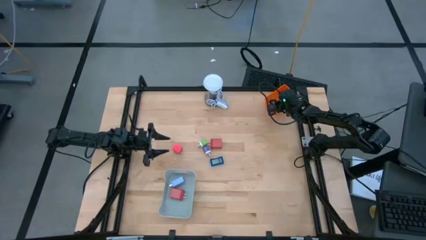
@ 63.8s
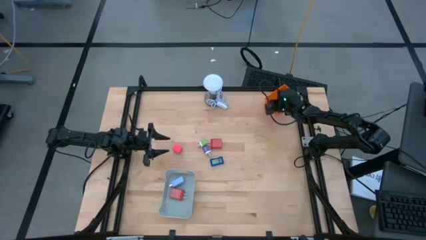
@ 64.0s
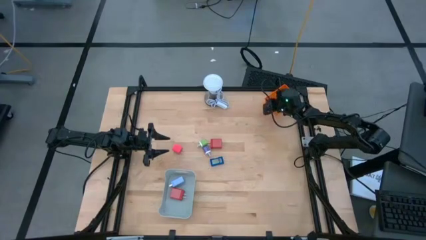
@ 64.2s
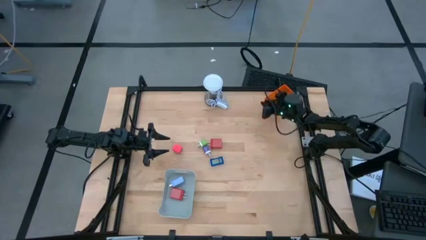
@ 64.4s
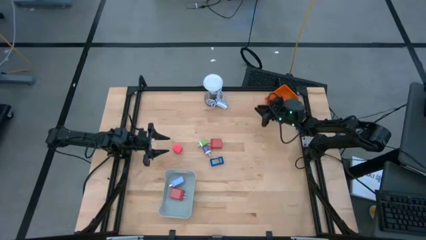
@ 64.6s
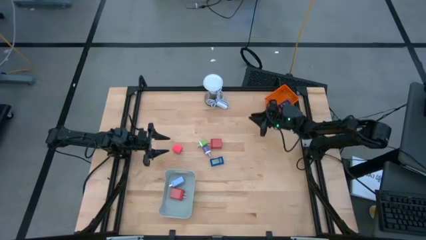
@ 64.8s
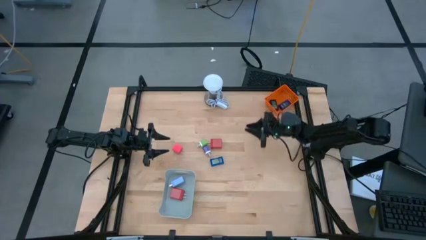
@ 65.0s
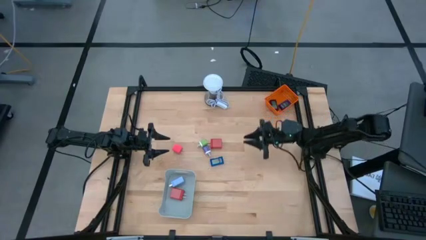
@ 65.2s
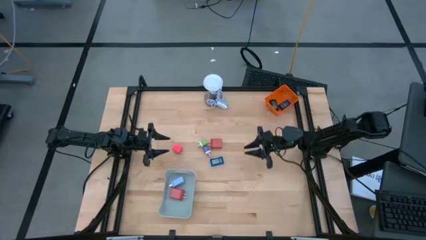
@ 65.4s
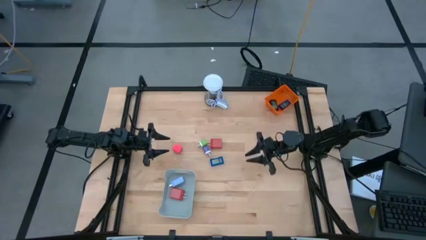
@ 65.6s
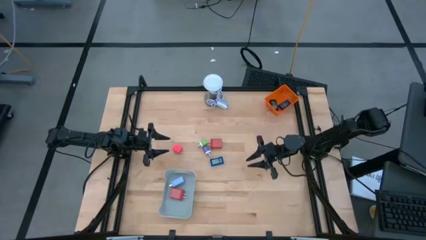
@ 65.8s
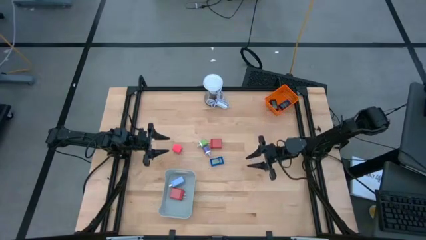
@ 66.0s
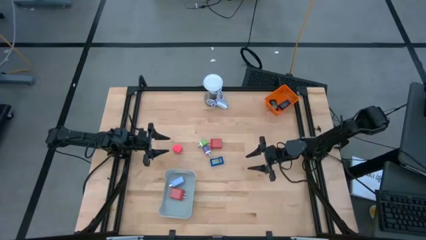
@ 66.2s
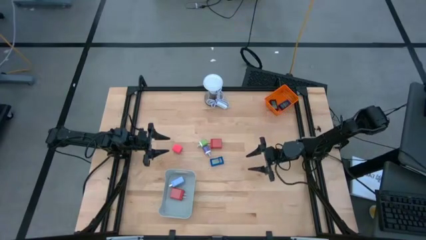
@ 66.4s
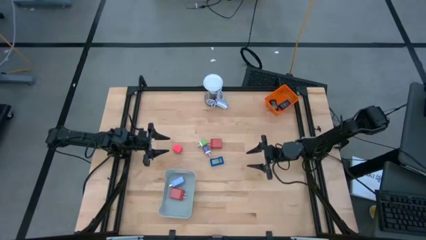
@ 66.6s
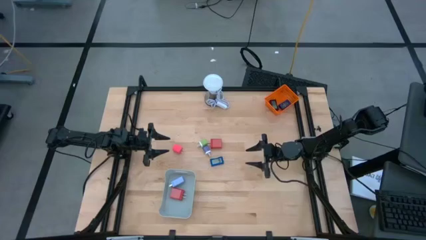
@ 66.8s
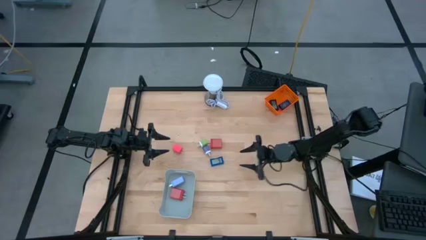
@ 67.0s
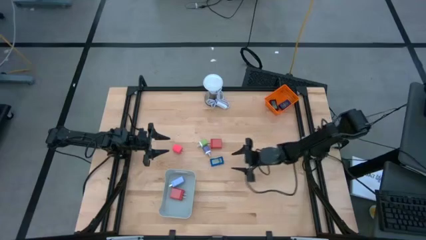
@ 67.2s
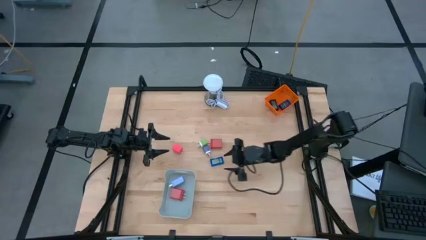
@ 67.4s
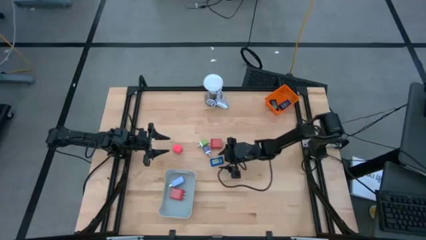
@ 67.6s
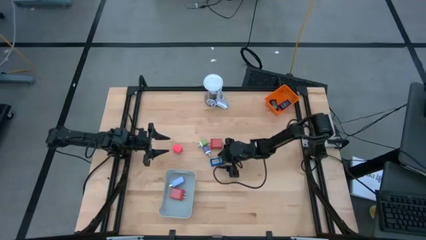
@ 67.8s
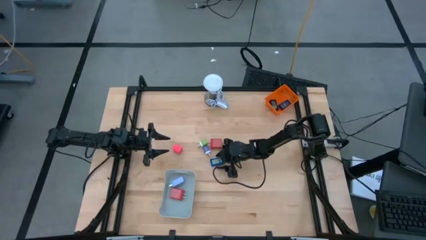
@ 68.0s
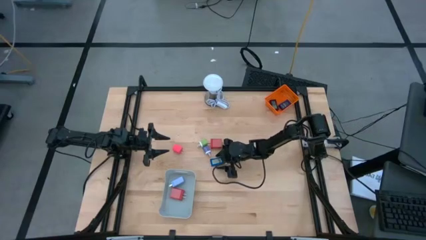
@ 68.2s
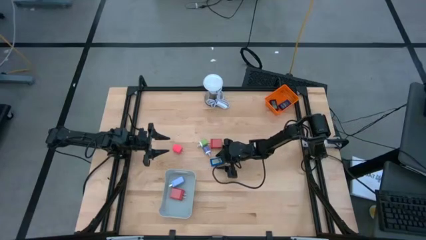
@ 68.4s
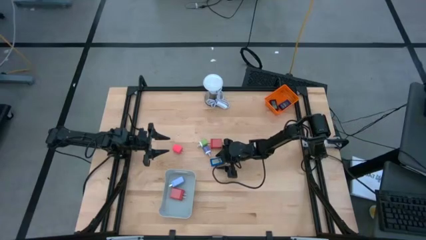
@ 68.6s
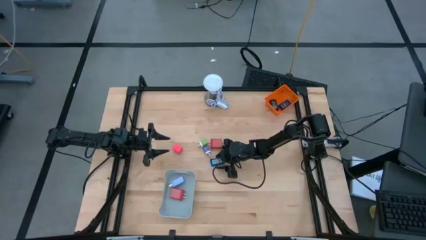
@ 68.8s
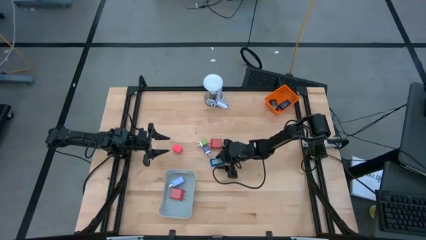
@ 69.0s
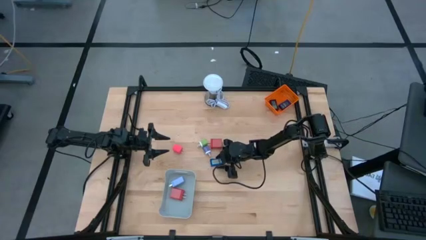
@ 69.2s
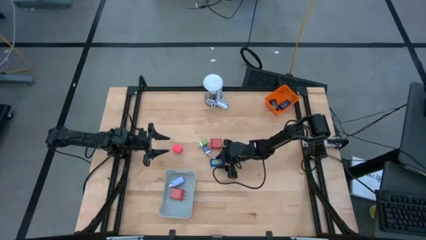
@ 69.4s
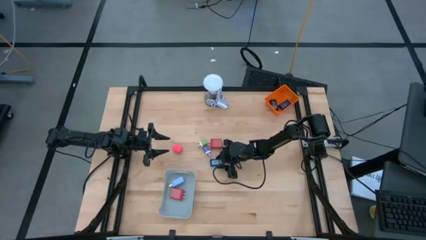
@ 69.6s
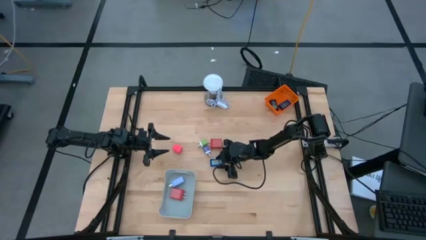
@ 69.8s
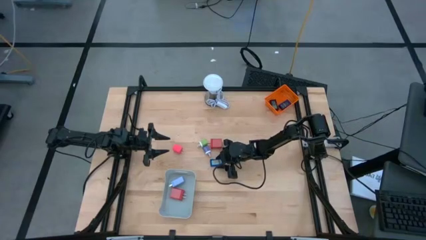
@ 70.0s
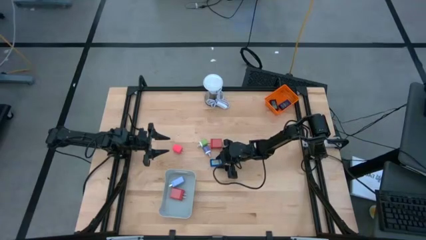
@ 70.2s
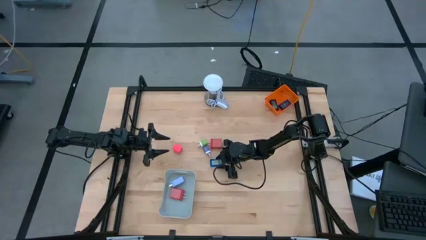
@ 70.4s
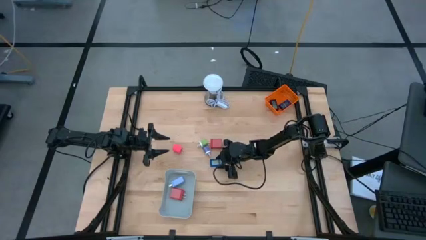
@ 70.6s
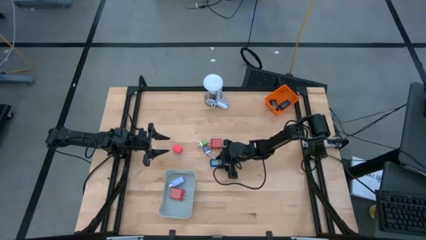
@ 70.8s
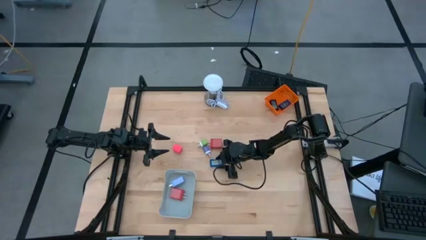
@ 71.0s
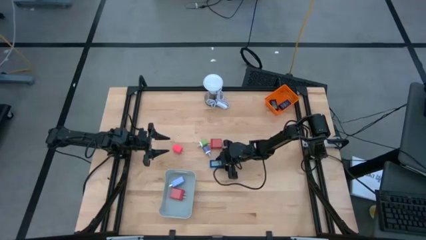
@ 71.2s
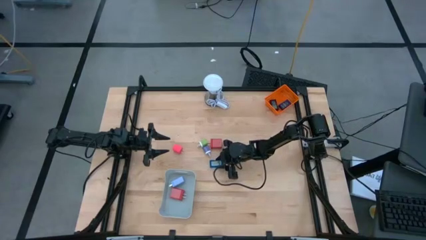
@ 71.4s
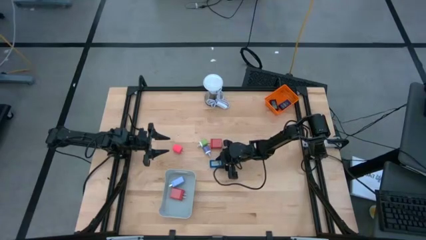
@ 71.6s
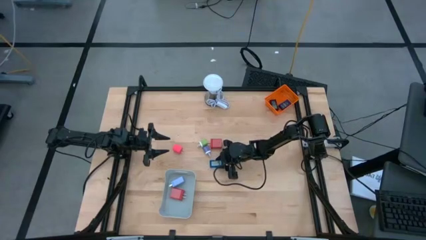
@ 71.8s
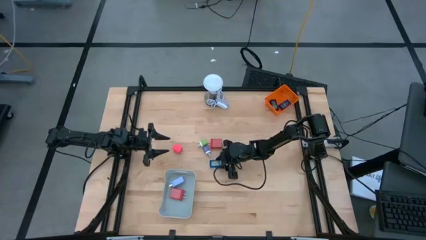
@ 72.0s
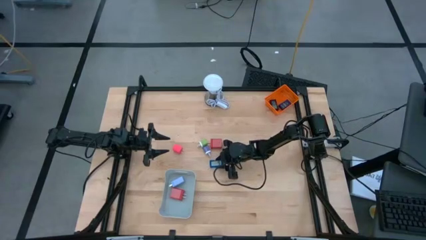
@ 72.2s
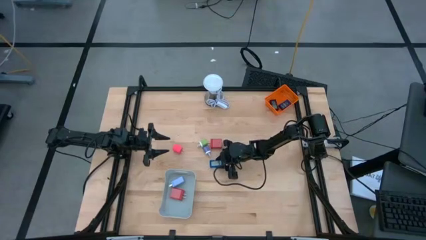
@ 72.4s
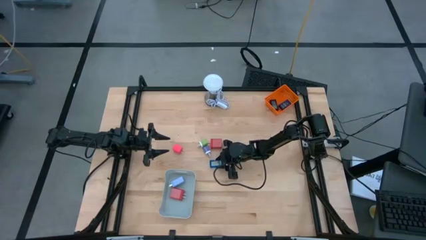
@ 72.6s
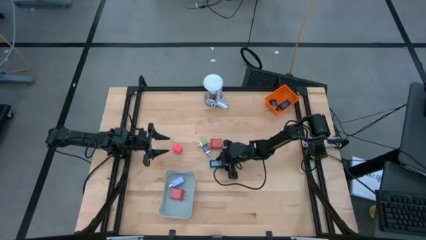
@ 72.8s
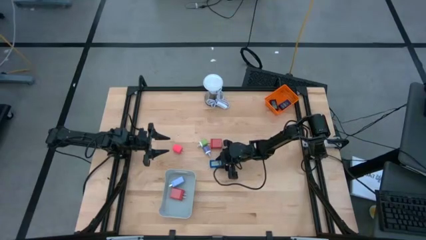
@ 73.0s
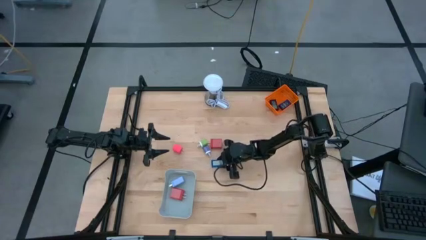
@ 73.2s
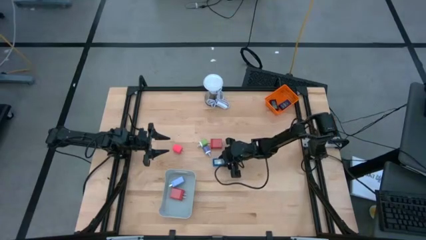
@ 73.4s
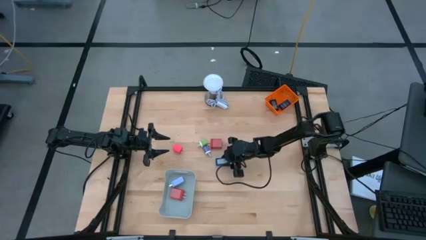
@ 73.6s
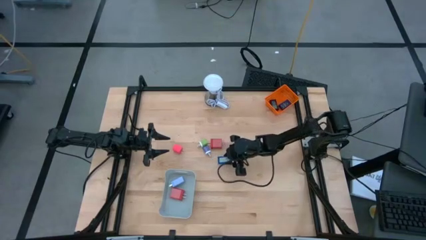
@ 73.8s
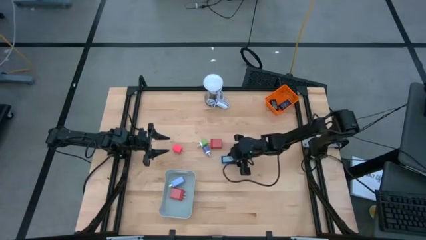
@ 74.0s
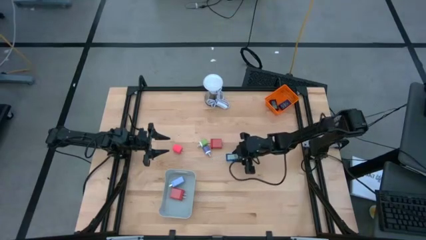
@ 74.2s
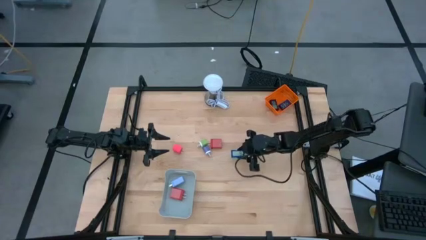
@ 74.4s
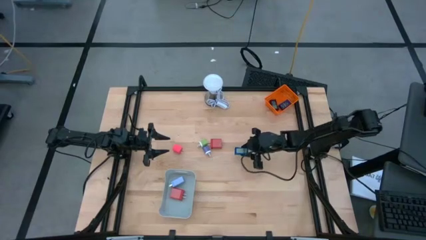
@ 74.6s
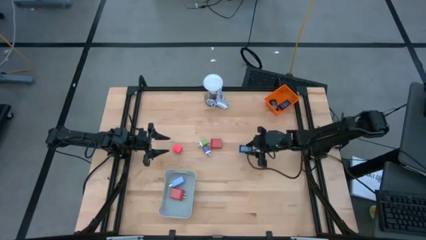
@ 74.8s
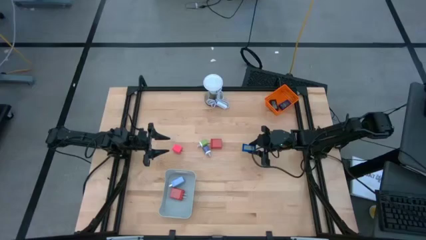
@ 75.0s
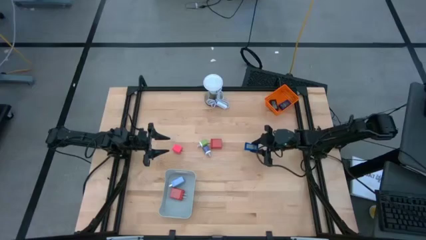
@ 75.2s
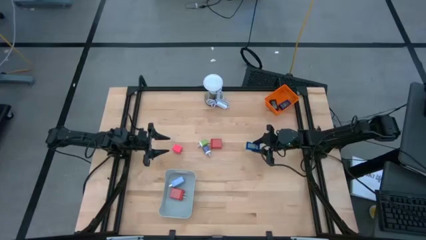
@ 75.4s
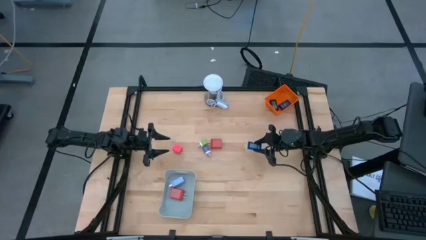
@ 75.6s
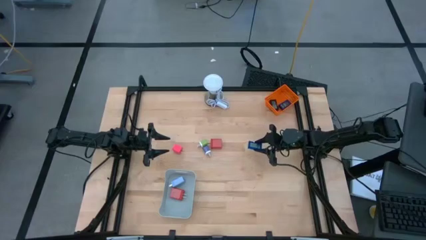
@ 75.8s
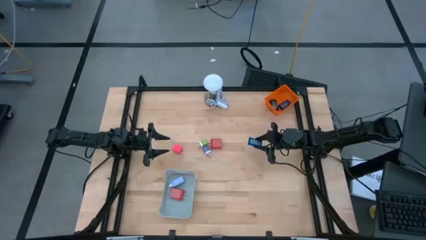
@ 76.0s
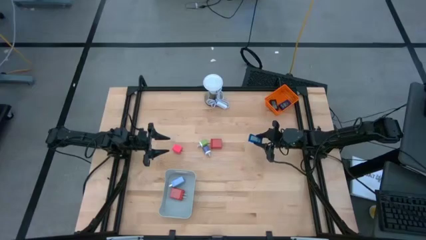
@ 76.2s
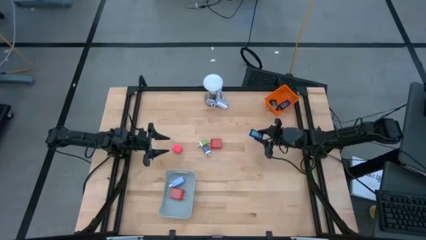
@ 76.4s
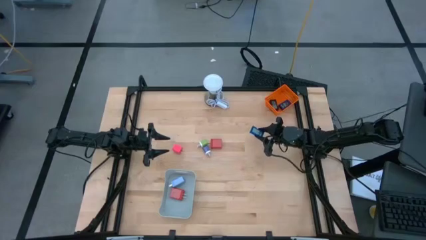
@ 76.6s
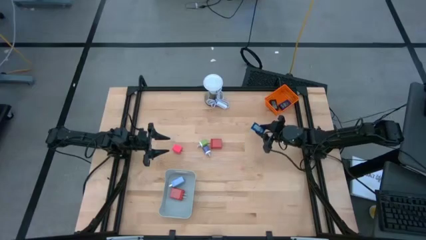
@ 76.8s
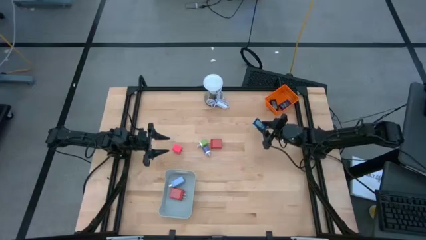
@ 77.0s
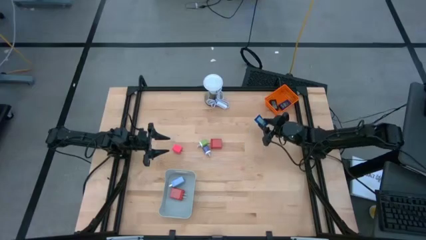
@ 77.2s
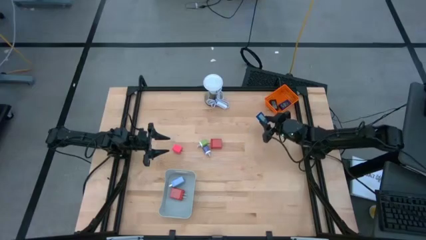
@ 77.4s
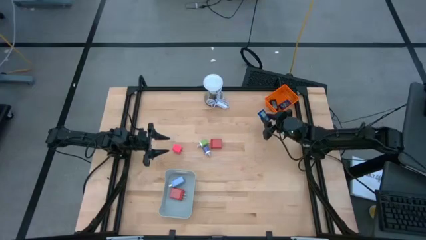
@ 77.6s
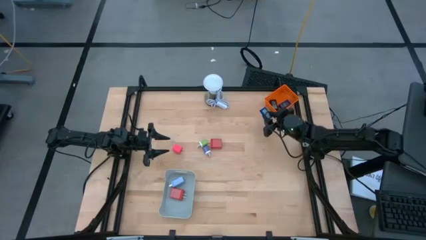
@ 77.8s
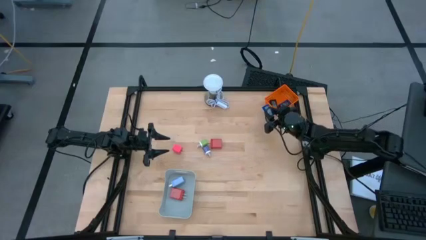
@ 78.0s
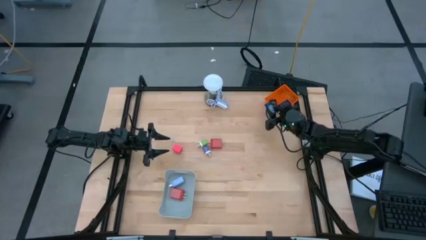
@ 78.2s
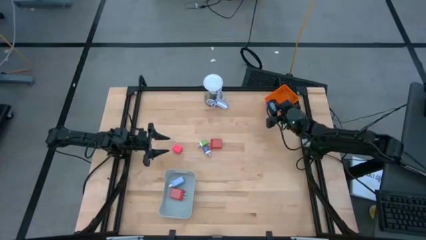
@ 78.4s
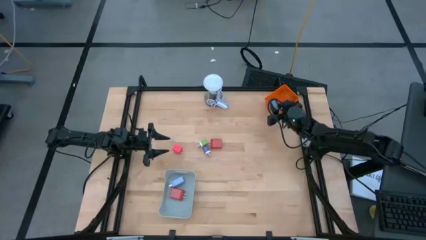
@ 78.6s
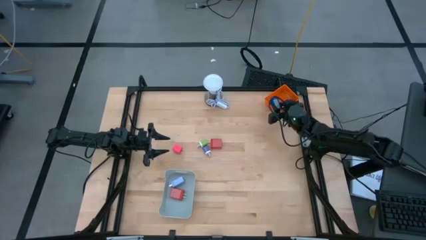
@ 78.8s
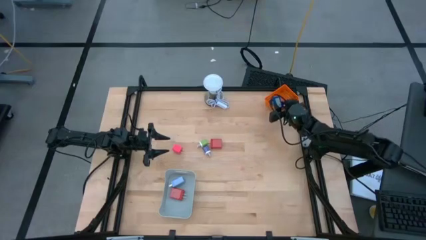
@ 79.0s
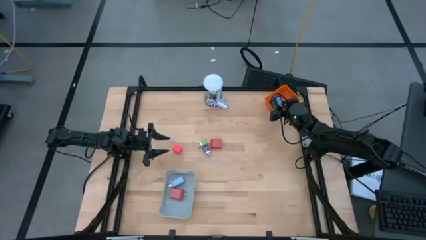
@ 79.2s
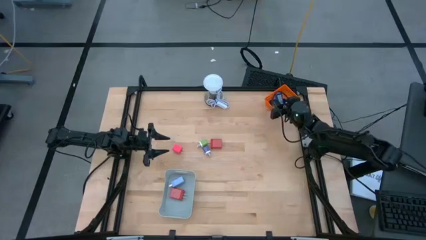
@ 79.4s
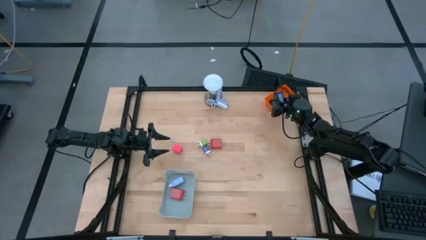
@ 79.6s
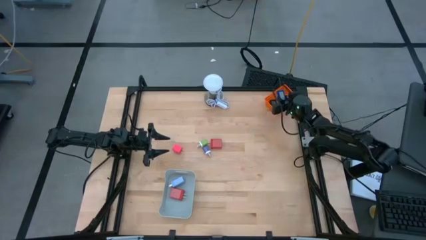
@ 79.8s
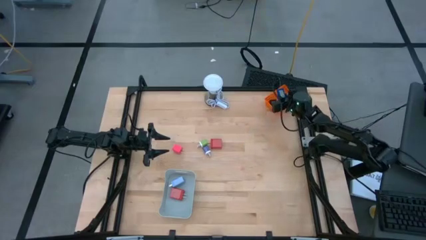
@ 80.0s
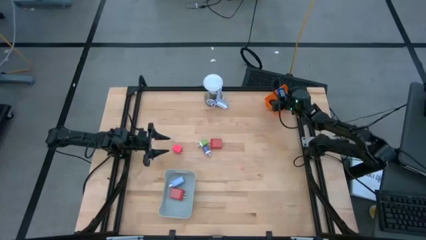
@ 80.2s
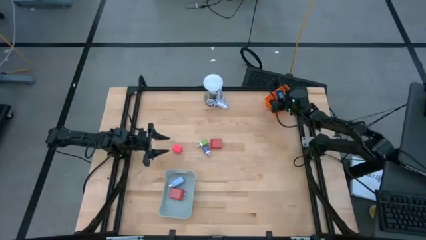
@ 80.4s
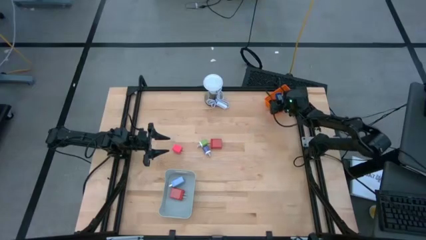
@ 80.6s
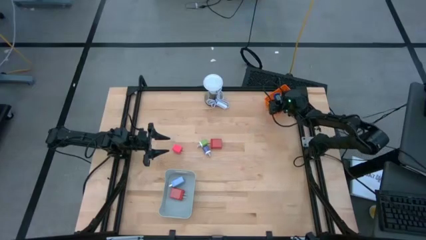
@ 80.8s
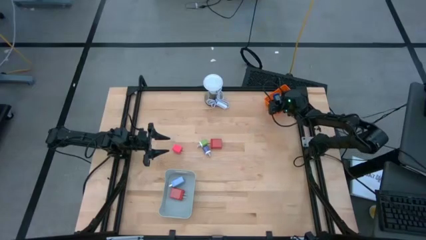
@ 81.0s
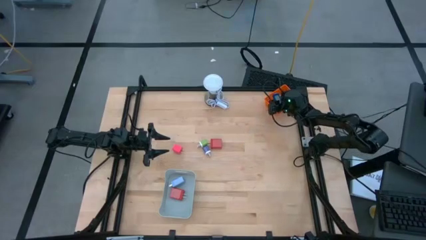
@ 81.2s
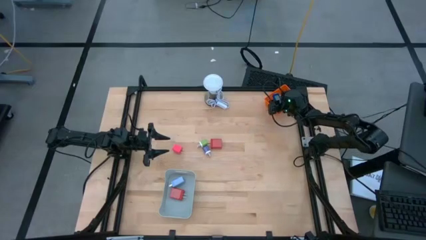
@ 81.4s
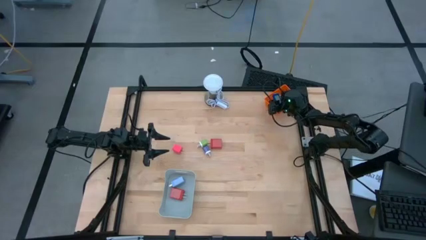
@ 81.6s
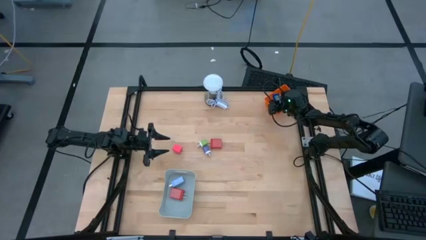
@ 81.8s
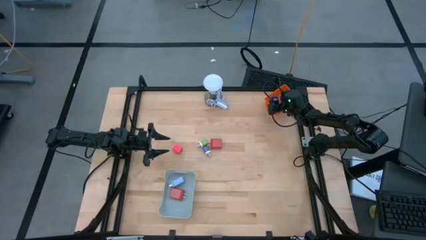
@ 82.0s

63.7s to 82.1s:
Task: Pick & Place Office items
Put the blue digital clock into the orange bin
